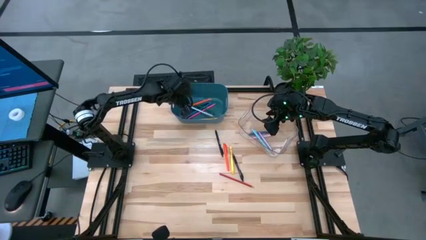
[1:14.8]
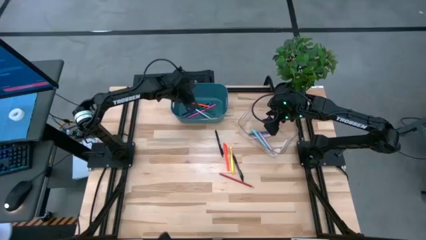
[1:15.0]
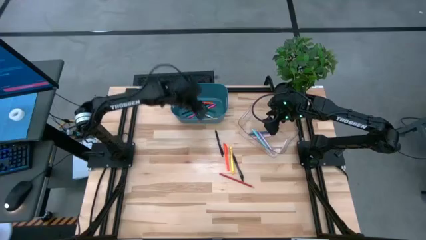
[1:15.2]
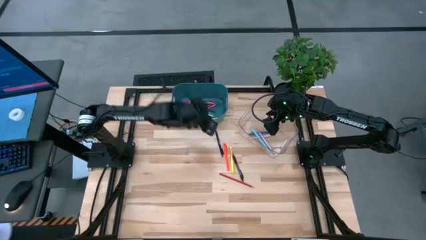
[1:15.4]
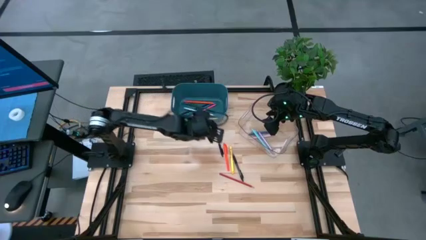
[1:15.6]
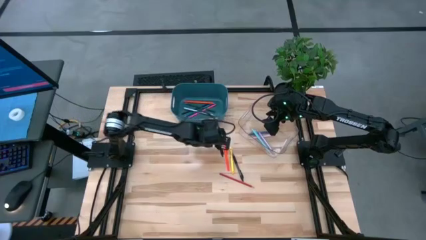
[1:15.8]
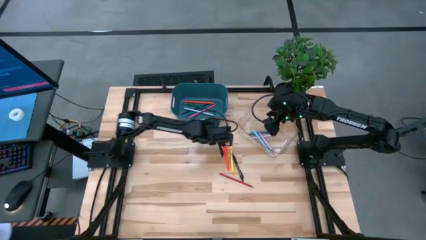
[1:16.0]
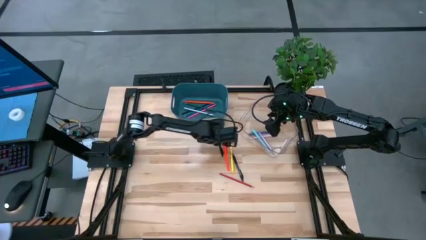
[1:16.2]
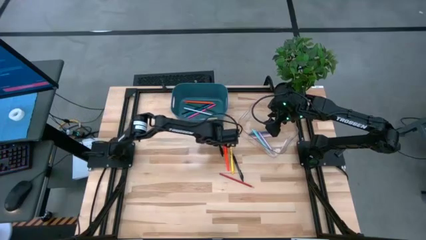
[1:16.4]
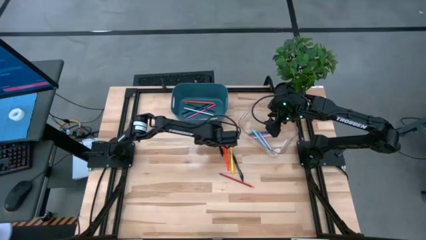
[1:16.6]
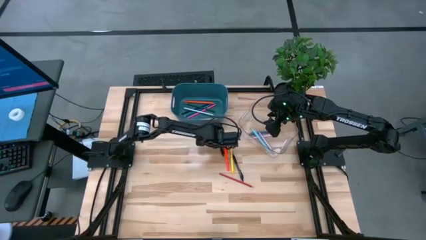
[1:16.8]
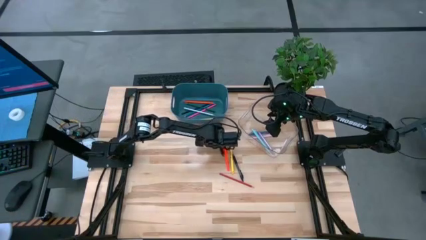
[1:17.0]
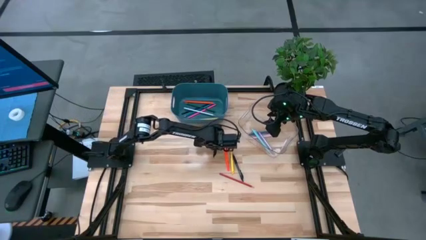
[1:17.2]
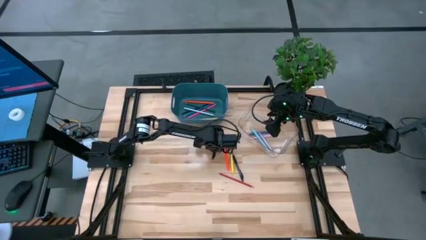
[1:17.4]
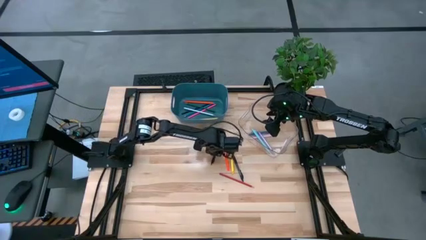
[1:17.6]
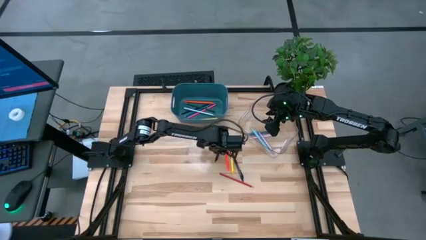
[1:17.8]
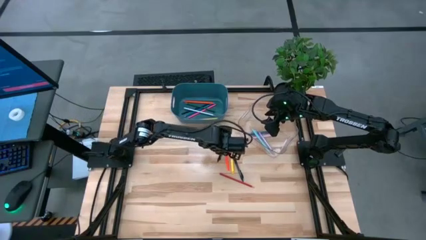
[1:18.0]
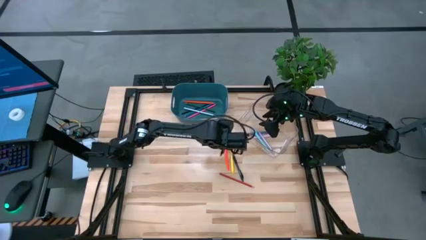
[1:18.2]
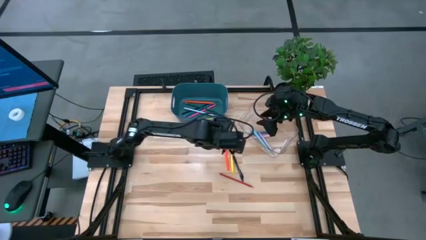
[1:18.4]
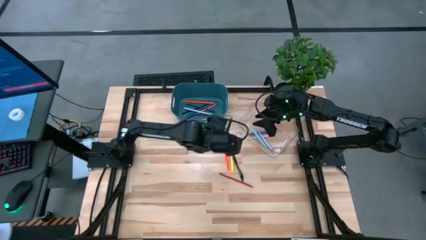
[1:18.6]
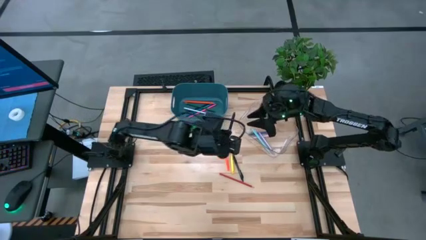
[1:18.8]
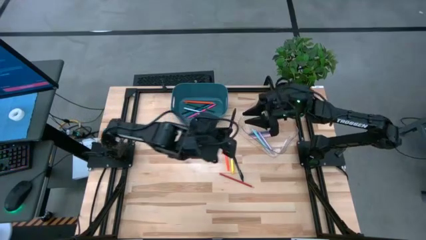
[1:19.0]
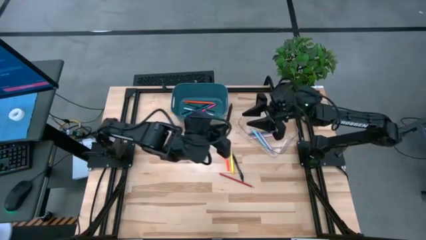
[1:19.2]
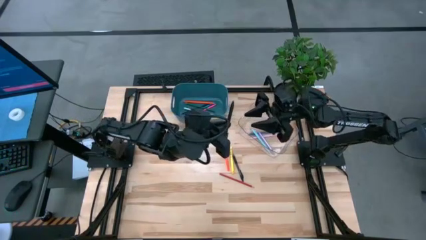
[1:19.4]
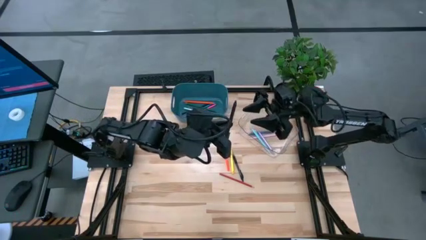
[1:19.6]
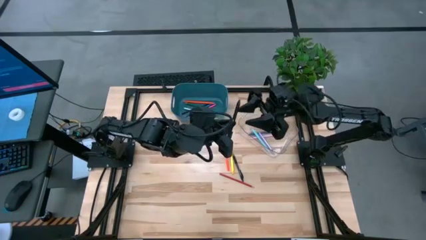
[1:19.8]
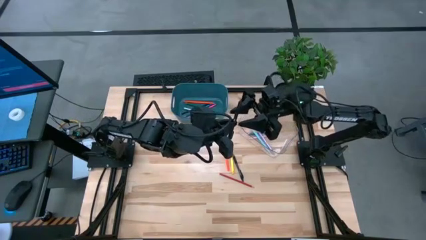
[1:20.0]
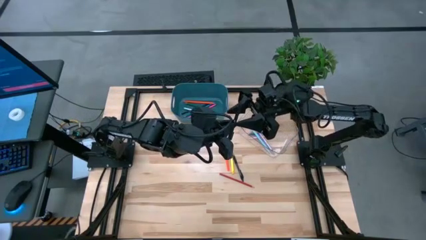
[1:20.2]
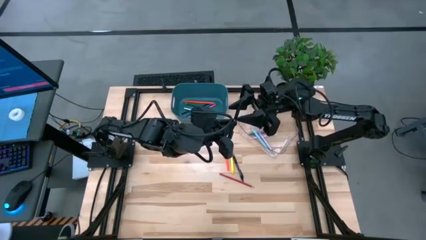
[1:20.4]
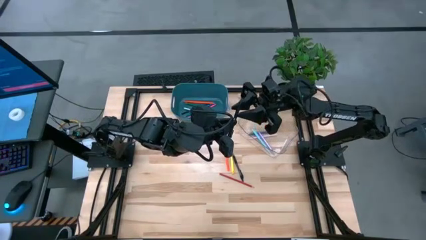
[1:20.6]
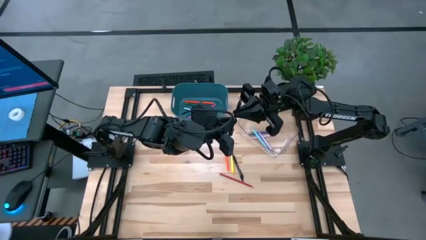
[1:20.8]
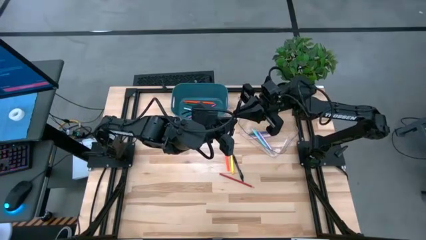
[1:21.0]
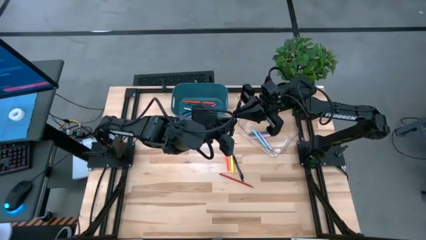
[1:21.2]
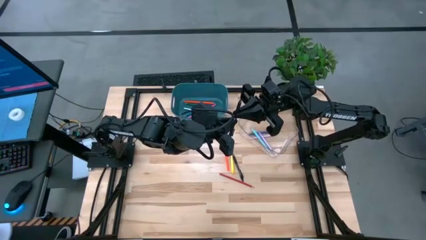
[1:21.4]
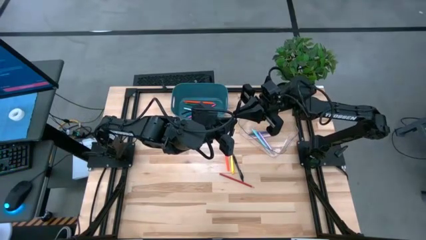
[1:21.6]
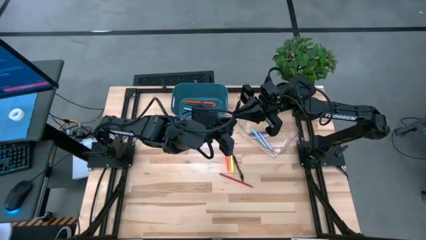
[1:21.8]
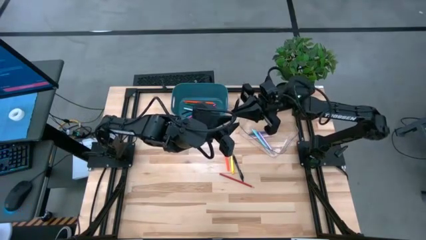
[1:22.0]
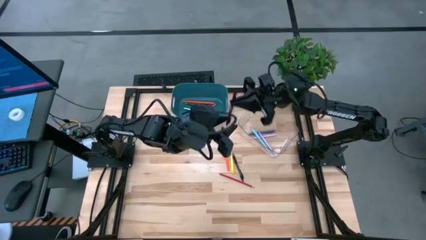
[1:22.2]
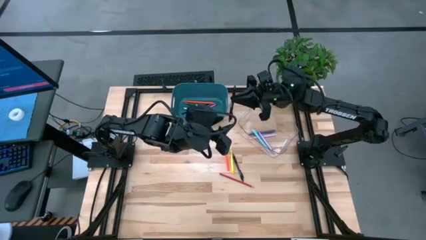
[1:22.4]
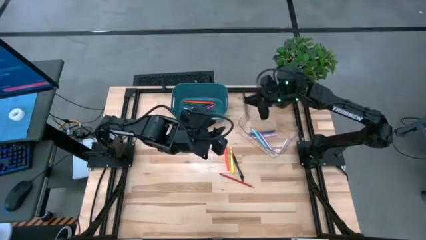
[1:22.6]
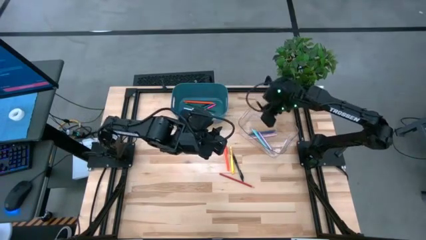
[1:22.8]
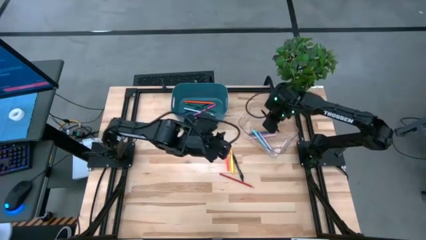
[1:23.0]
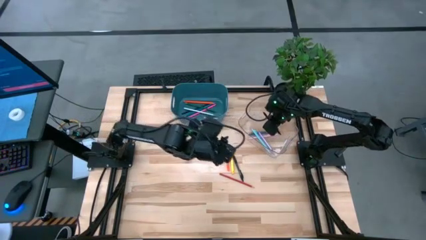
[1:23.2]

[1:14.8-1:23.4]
Task: Sort pens & pencils
Put the black pen into the transparent bin

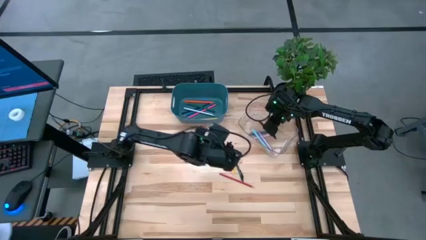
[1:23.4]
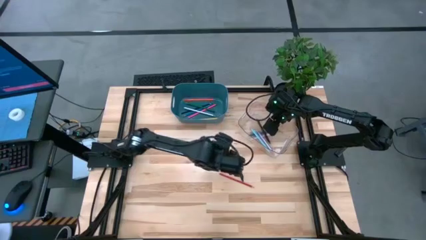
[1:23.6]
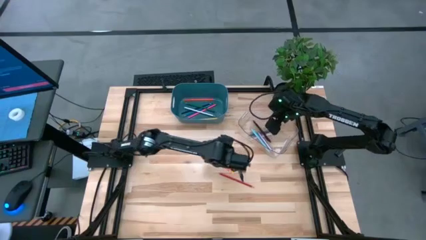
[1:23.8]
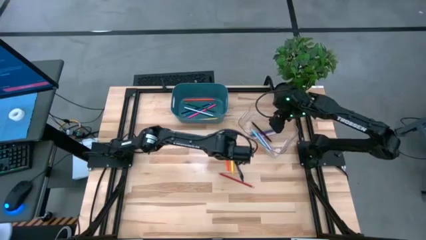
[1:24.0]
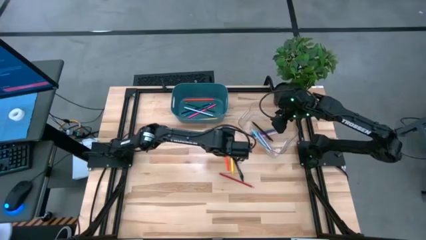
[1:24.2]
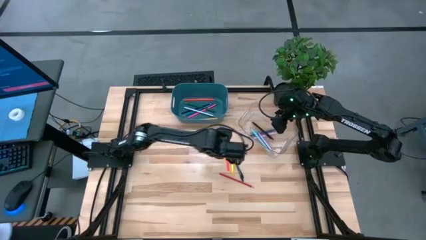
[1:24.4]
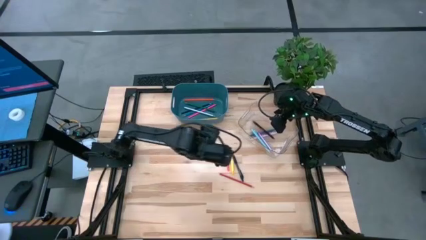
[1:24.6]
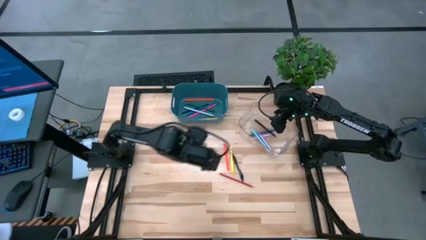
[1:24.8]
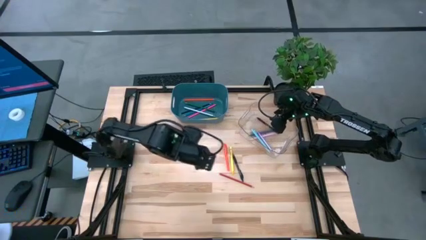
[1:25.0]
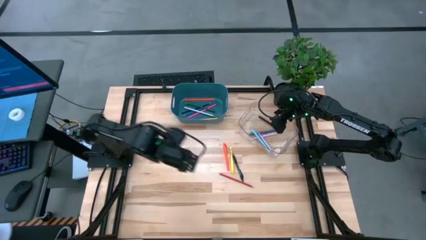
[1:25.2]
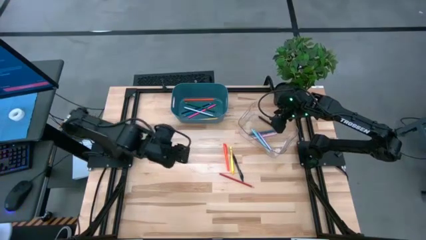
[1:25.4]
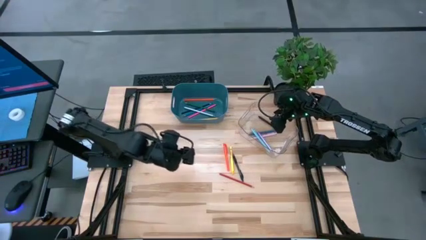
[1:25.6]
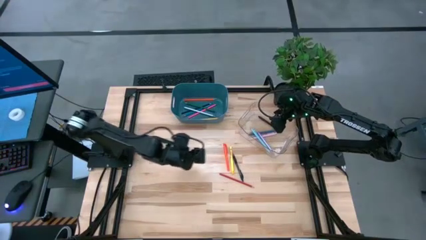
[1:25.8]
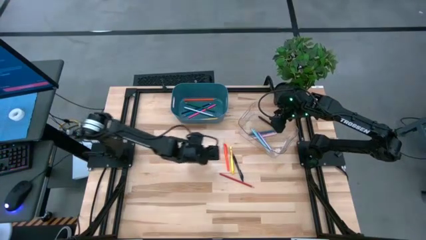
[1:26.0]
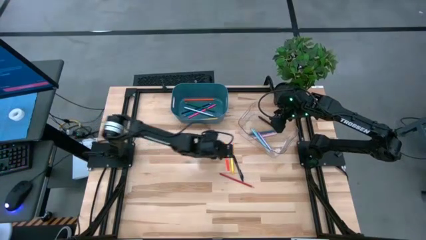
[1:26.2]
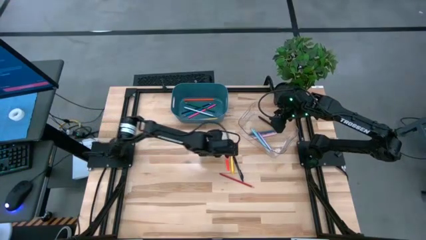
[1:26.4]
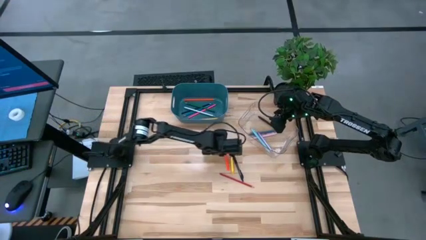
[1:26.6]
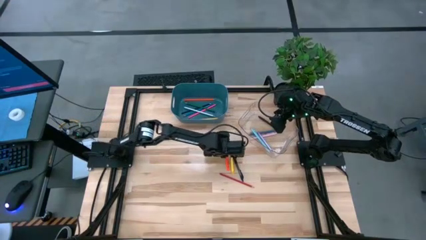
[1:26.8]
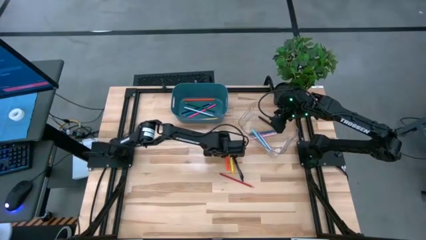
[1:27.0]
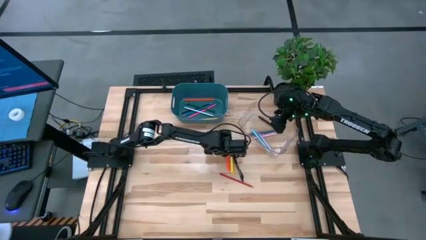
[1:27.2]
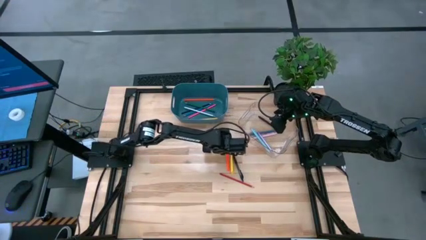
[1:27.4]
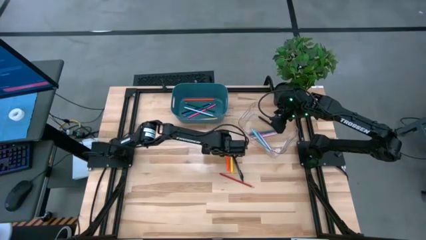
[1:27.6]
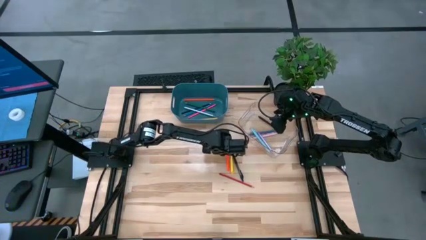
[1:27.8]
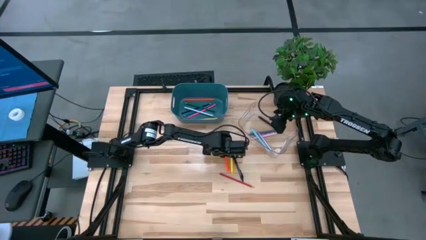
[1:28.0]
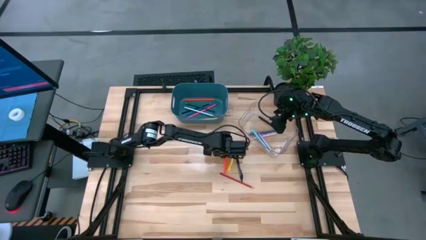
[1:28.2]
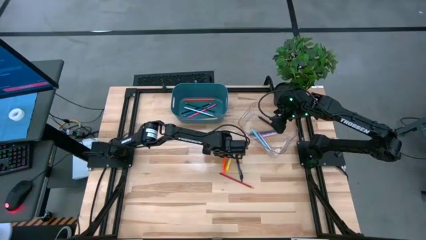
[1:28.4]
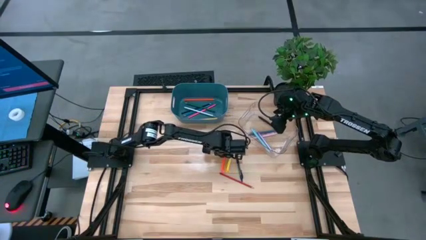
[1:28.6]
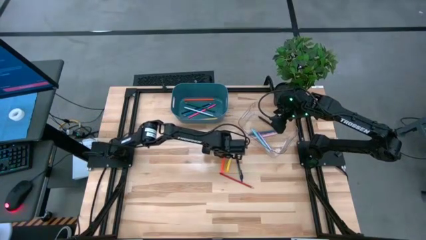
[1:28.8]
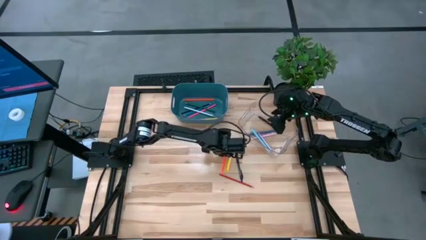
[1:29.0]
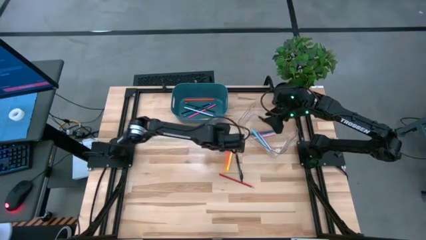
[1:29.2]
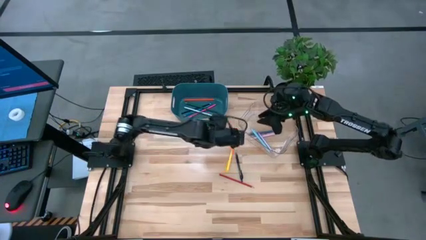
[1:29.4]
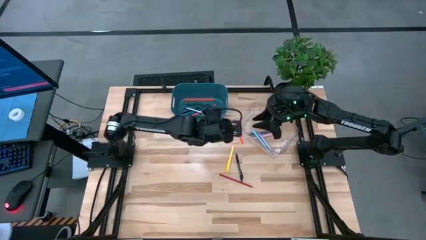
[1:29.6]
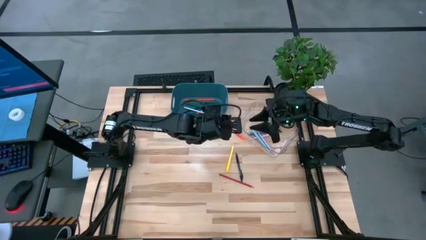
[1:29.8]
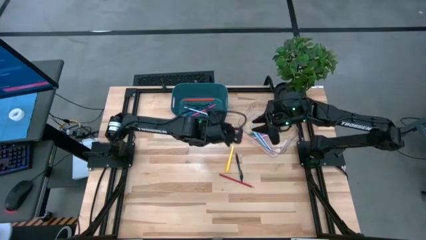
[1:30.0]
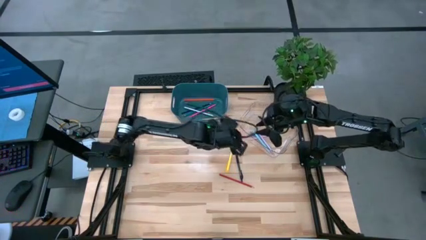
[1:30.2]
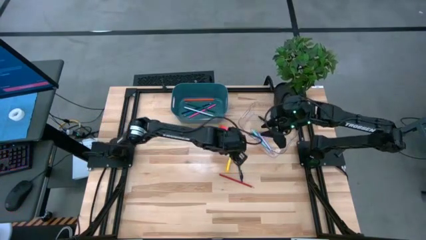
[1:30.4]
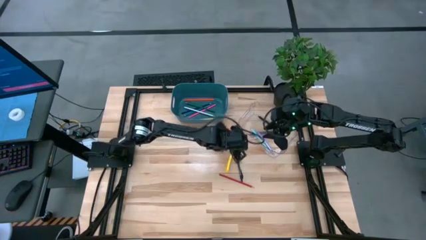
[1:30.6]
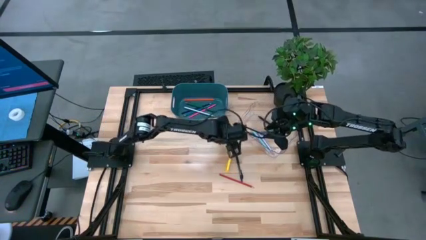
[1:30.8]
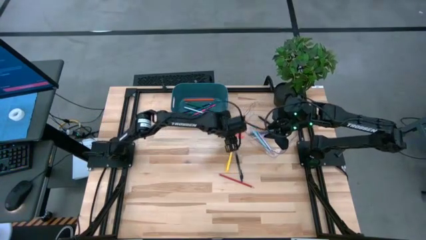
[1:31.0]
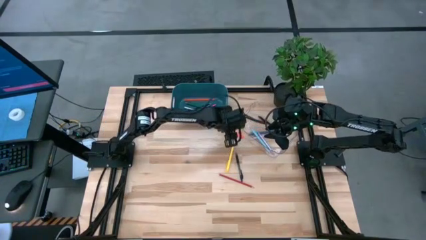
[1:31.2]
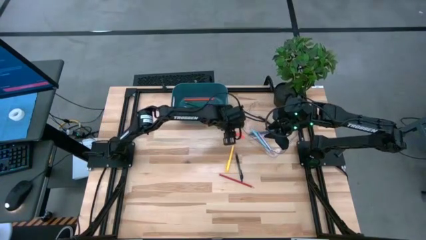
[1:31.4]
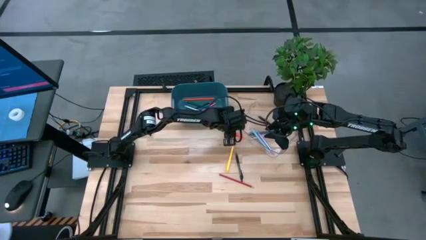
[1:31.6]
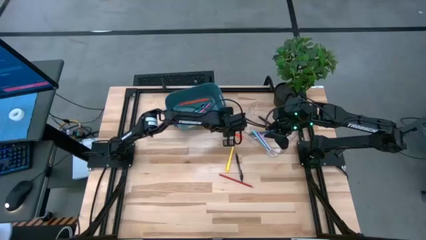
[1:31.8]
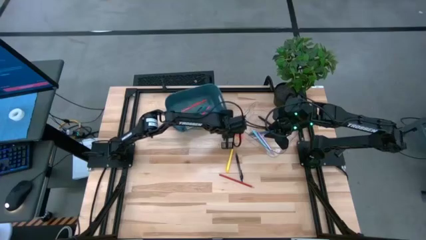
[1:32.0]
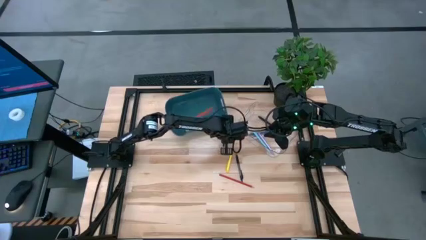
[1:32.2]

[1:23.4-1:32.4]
Put the orange pen into the transparent bin
